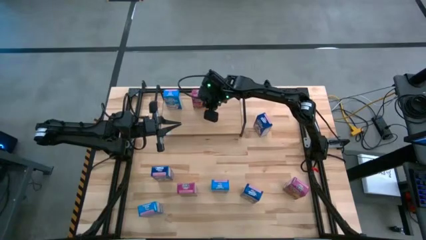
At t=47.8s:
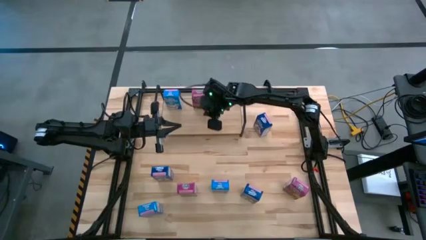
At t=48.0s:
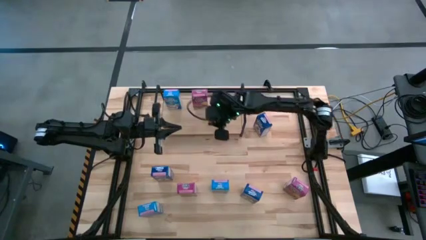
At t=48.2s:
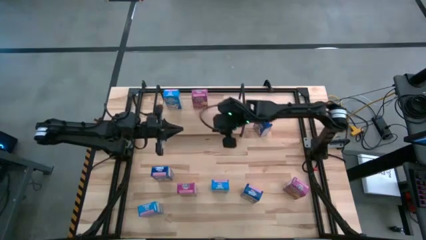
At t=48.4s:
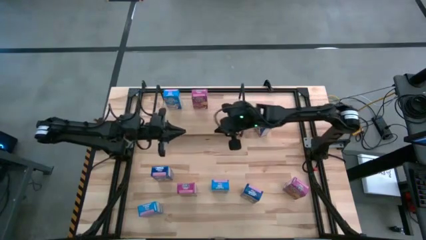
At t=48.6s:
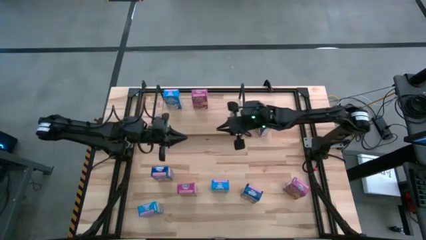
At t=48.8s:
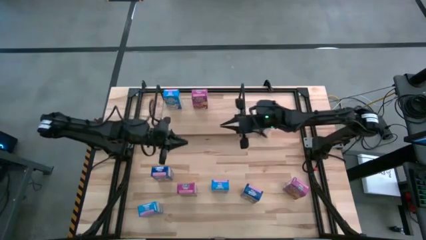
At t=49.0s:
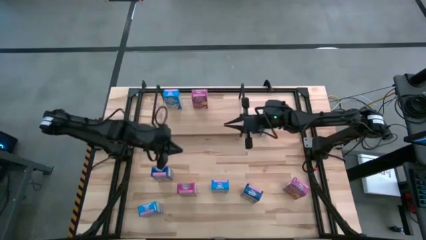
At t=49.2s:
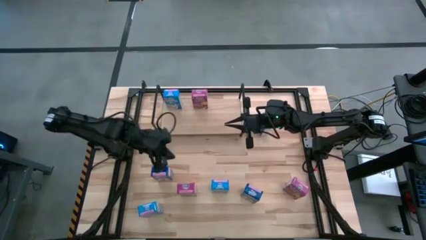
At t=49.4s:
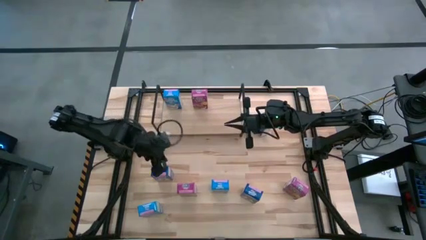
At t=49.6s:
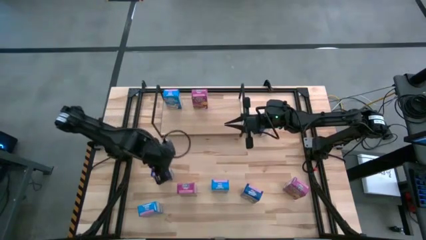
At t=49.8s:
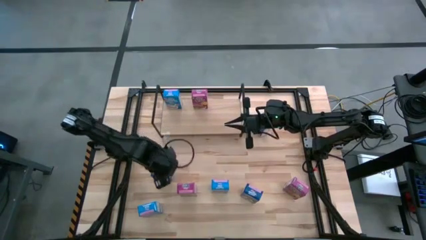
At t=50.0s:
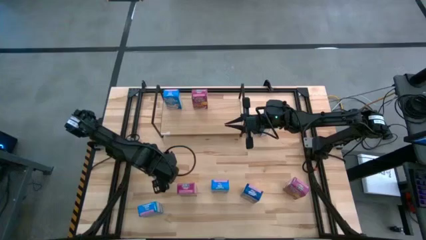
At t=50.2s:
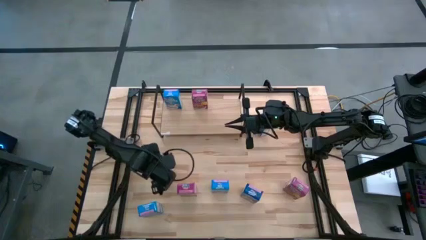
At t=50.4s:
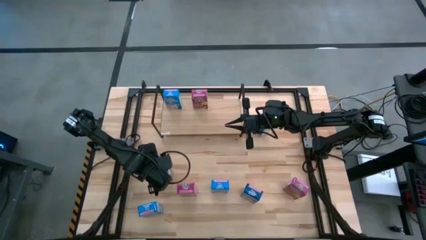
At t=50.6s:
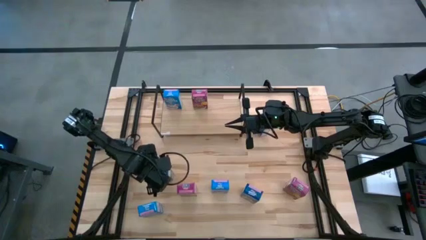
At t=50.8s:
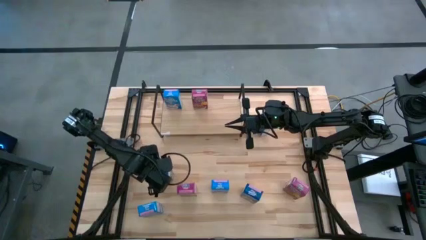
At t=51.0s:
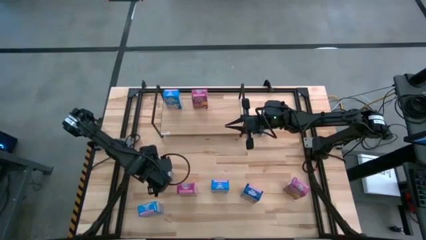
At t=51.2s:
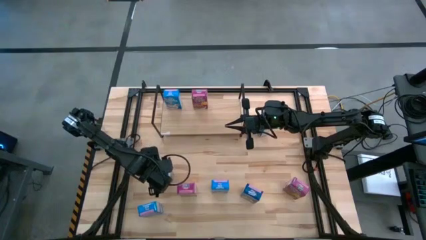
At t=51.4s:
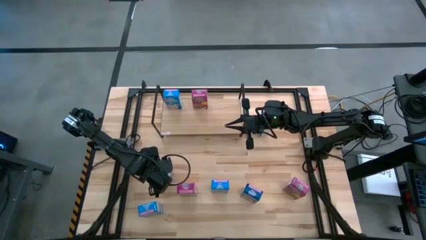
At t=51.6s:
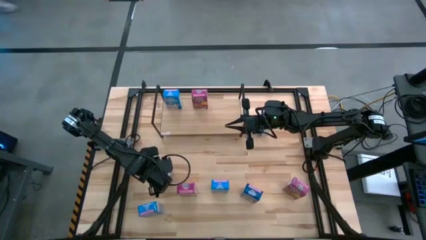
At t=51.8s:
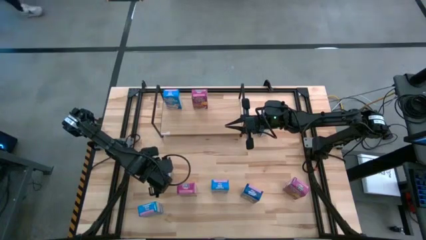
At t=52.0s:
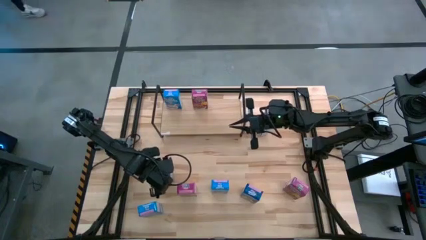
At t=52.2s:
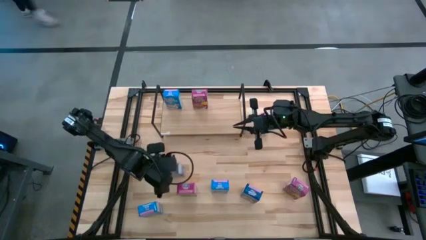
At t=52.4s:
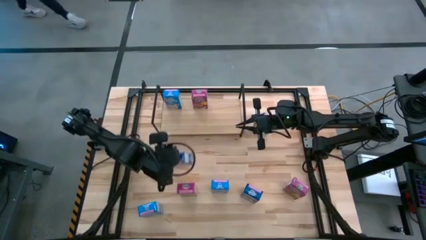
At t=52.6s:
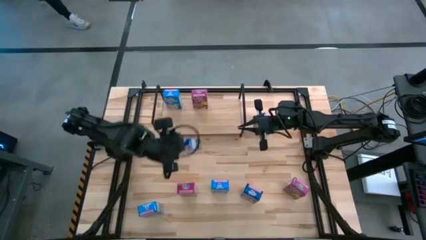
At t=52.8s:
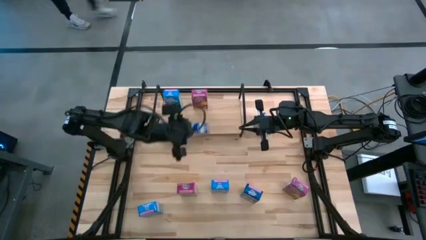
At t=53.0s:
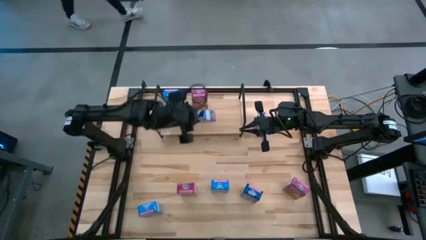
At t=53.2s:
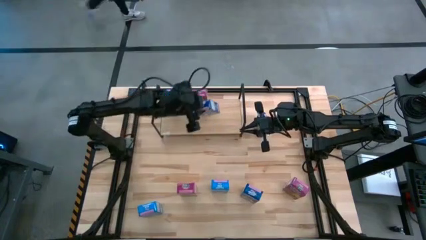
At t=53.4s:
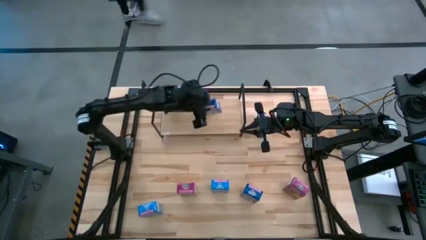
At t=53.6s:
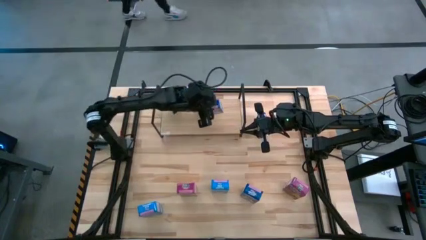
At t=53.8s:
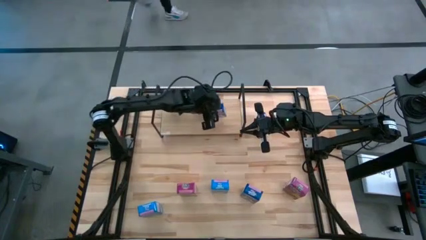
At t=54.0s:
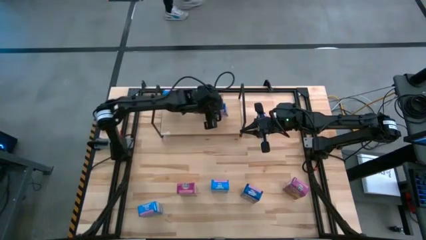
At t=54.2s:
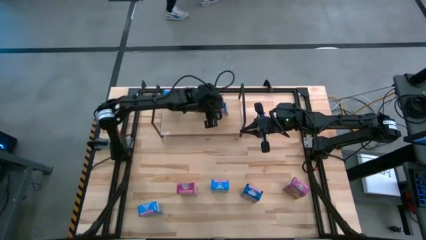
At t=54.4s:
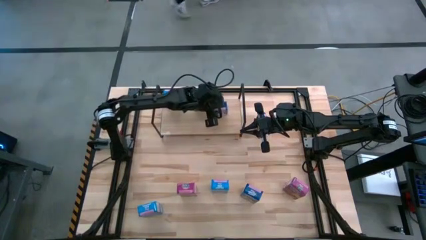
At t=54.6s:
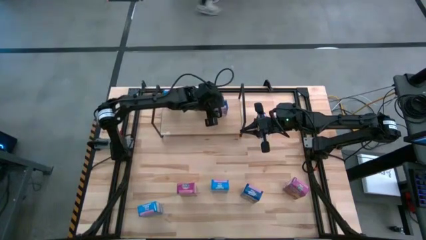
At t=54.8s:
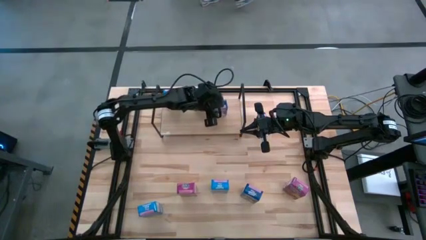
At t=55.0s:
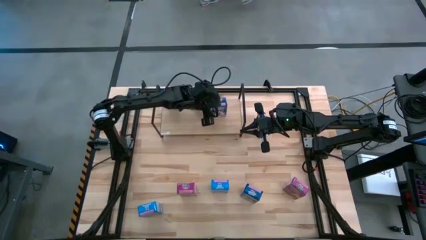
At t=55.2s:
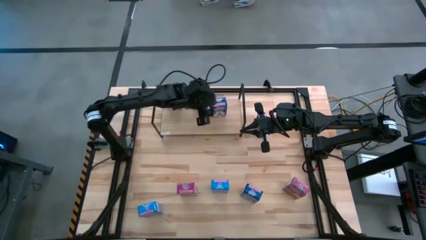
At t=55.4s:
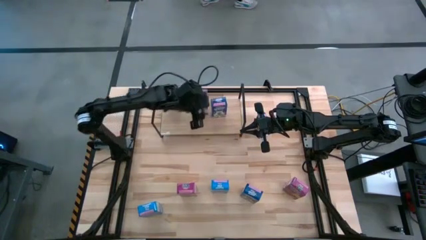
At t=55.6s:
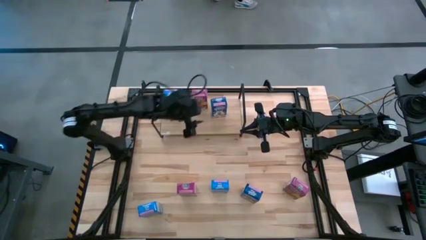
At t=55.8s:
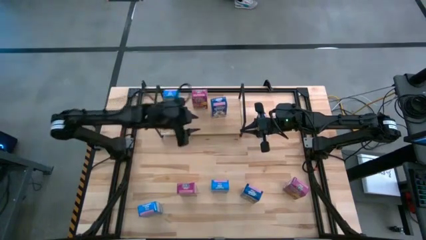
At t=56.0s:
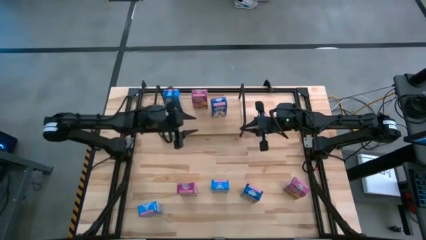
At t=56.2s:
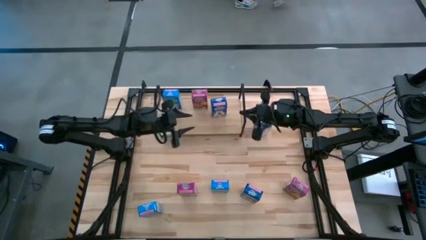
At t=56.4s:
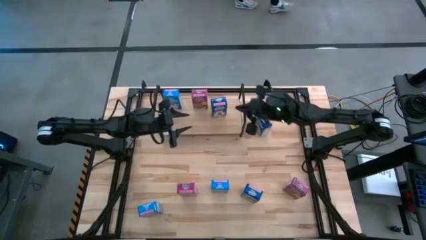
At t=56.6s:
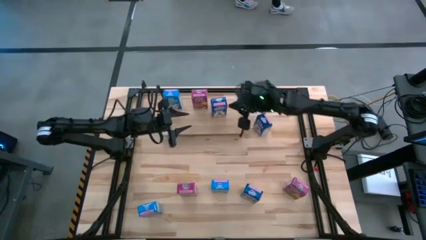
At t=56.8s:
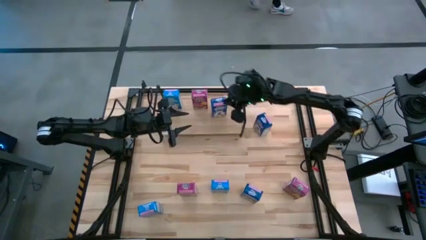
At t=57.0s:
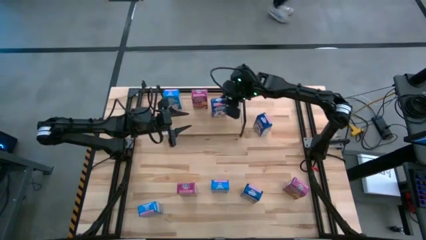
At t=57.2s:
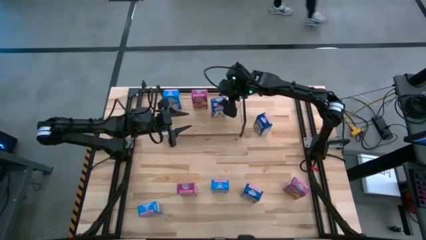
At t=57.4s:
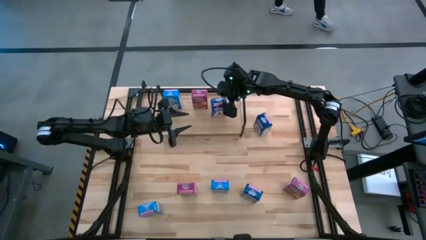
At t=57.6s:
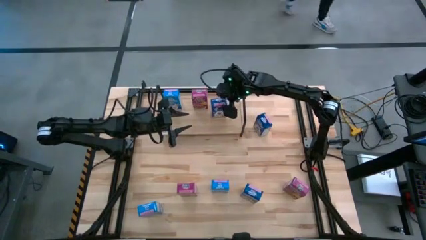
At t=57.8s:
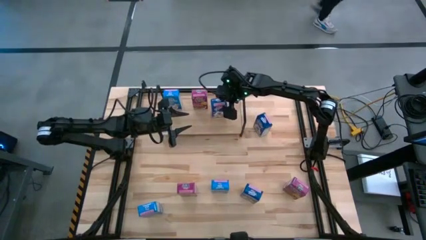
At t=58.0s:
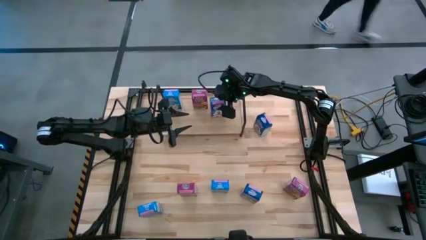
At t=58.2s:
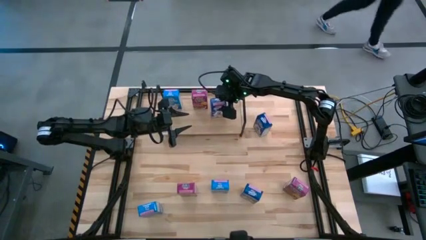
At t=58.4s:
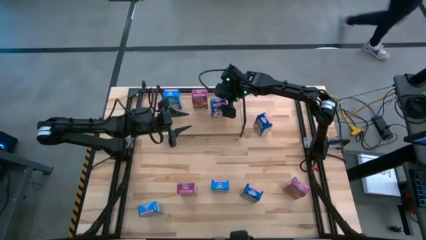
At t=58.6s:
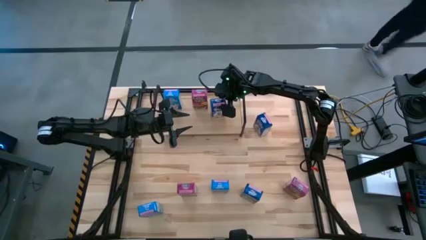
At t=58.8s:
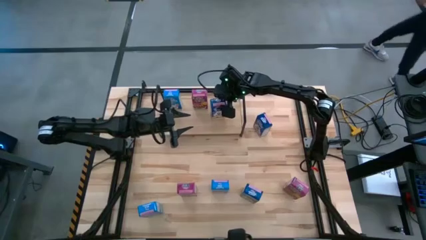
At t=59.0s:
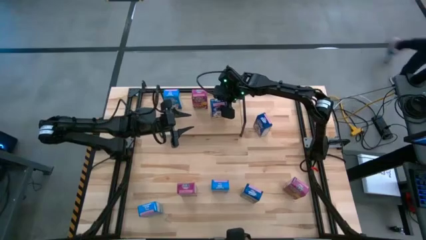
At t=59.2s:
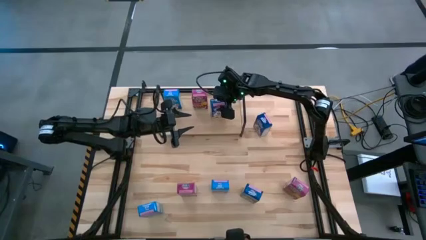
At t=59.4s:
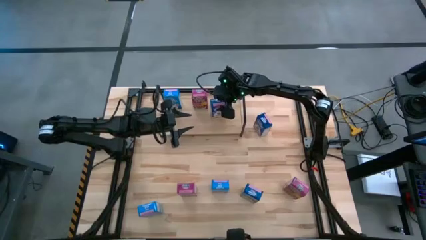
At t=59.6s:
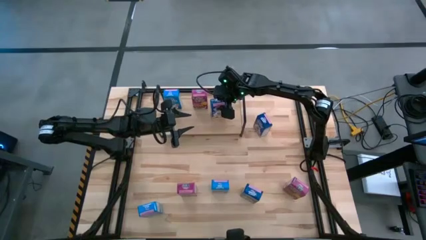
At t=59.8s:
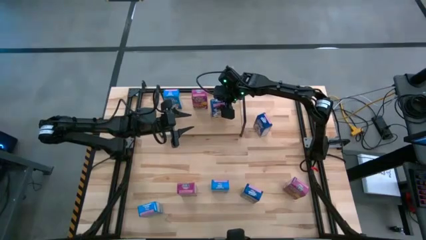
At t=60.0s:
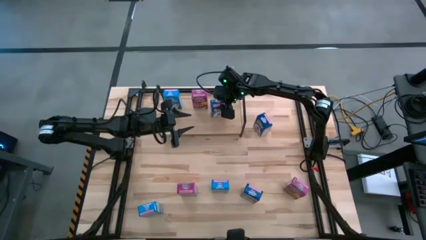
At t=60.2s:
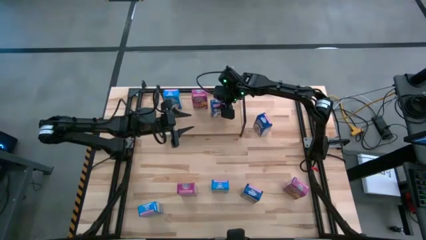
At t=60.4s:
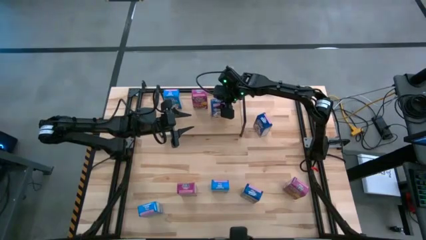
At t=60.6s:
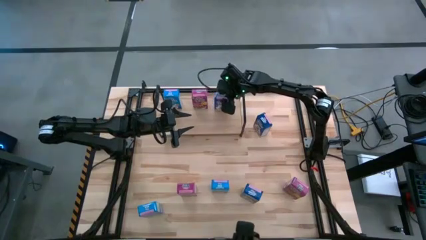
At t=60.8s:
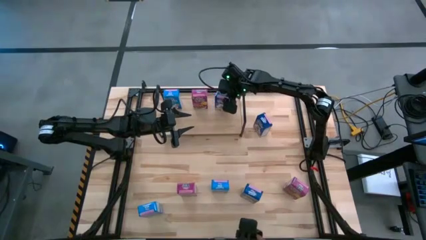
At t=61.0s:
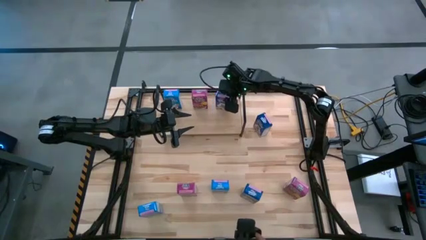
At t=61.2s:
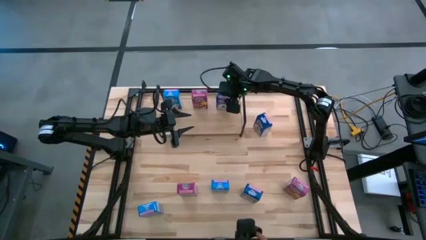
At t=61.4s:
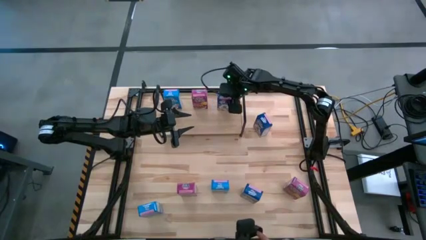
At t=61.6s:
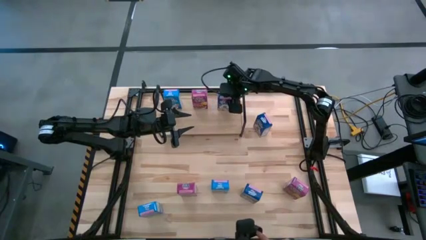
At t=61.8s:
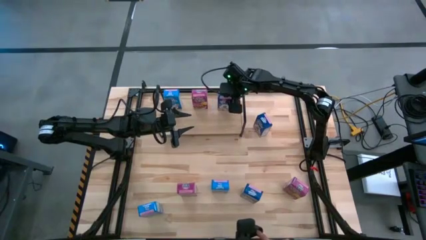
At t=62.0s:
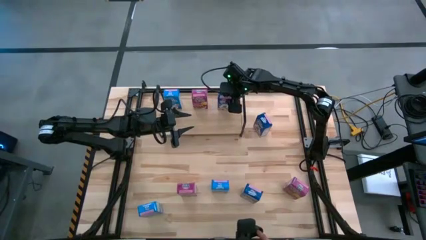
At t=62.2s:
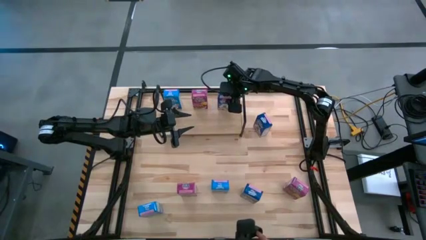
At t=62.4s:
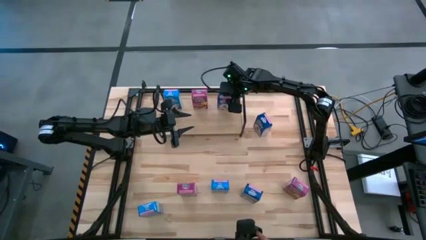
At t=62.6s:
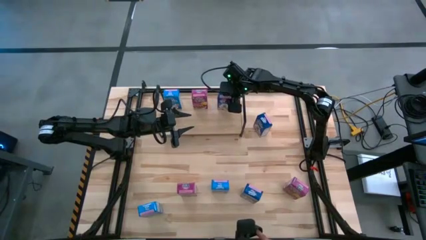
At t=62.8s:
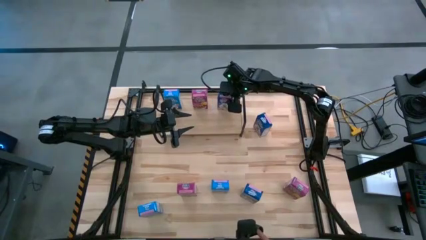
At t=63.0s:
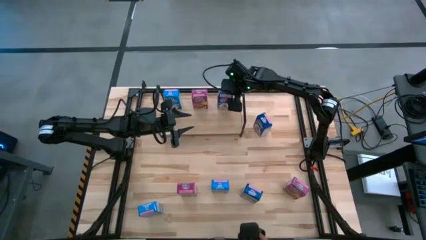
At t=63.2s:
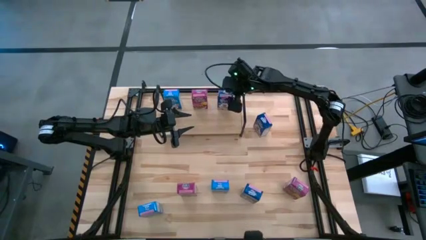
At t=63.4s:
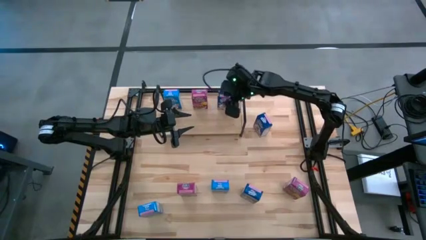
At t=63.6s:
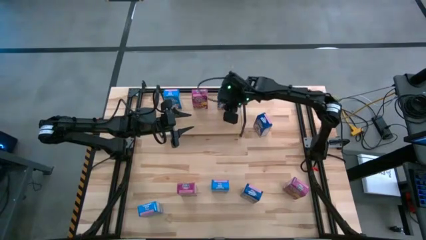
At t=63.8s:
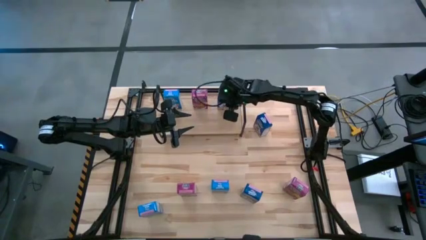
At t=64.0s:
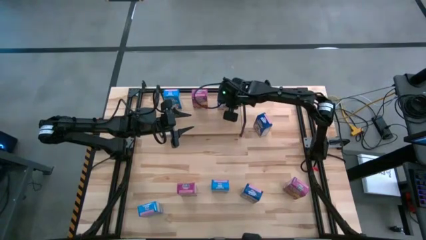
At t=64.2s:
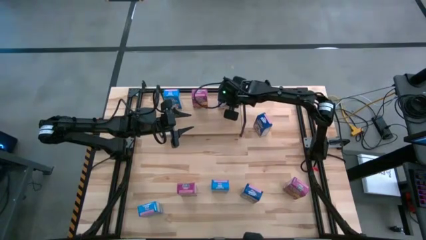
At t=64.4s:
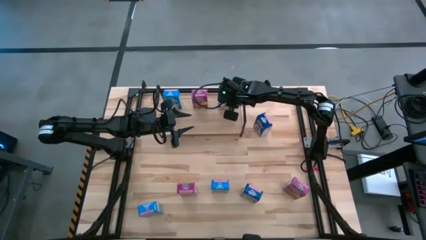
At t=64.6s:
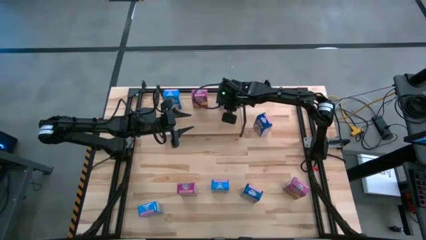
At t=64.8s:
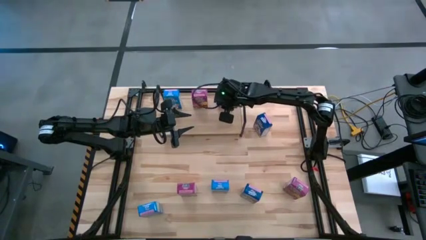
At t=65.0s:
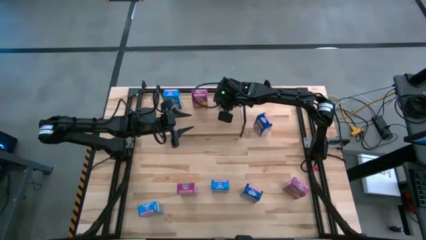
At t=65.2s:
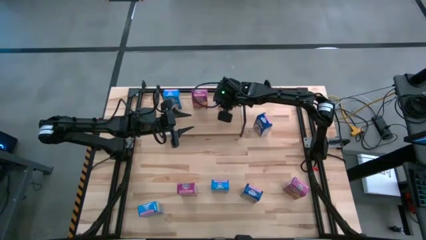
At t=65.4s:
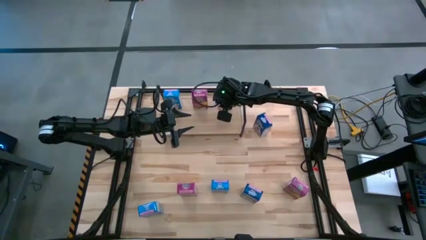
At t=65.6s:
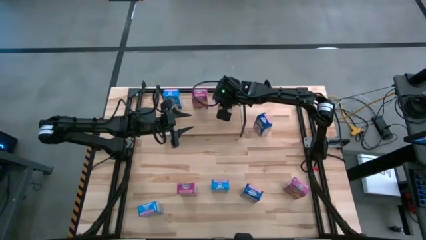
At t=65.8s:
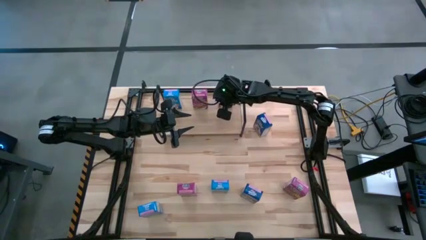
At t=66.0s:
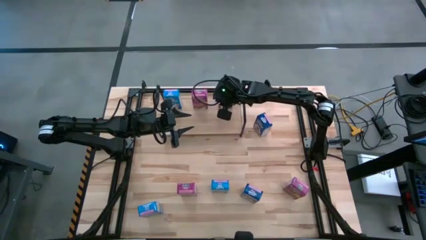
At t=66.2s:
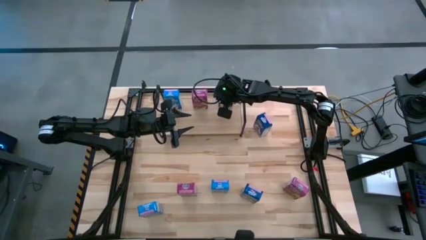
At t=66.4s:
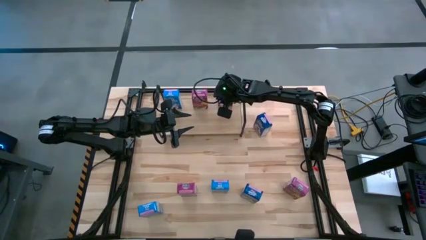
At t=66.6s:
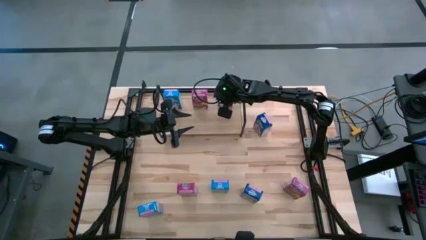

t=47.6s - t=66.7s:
Task: Stack cereal on shelf
Put the left blue cereal box on the shelf
